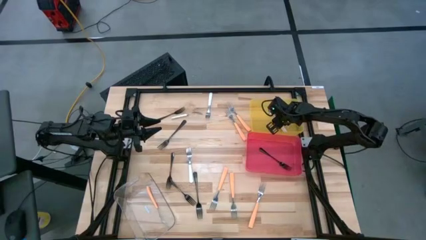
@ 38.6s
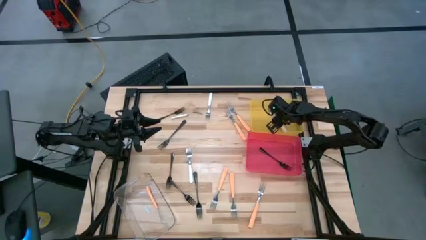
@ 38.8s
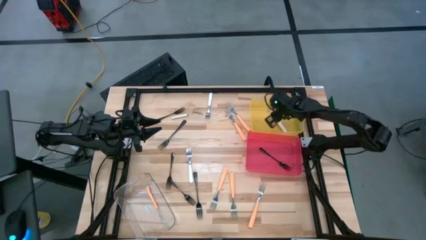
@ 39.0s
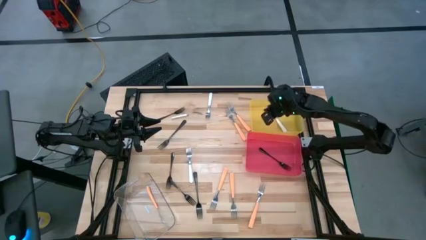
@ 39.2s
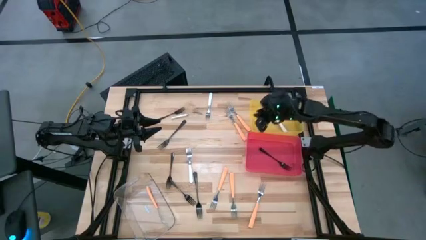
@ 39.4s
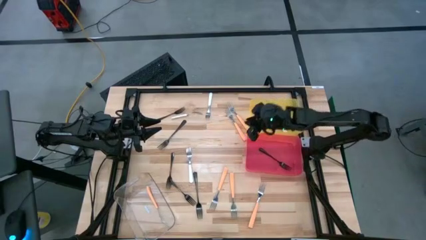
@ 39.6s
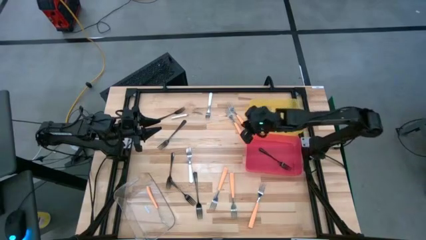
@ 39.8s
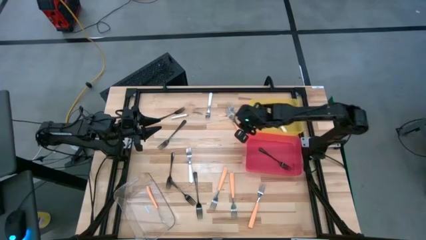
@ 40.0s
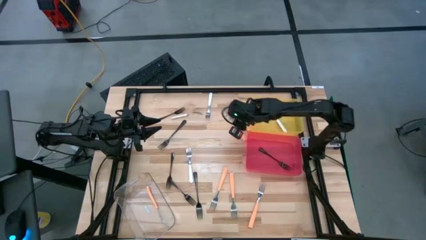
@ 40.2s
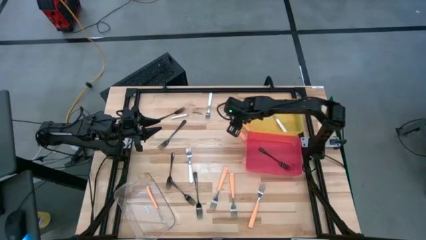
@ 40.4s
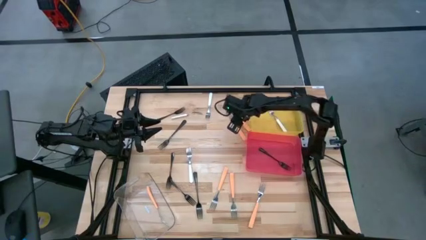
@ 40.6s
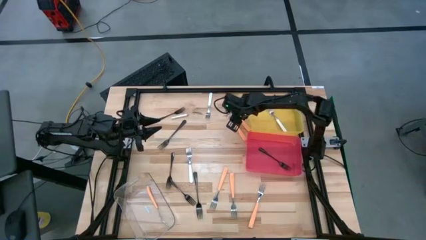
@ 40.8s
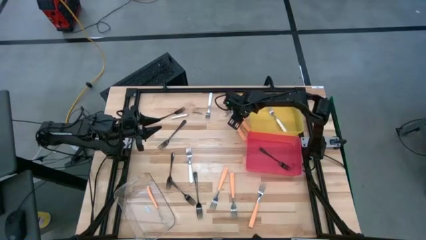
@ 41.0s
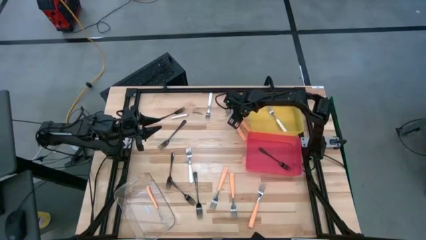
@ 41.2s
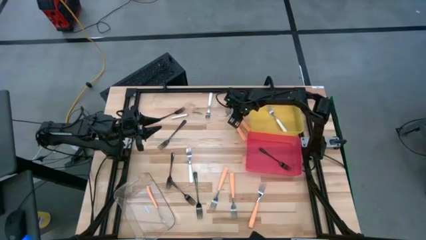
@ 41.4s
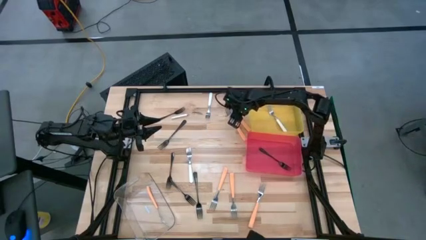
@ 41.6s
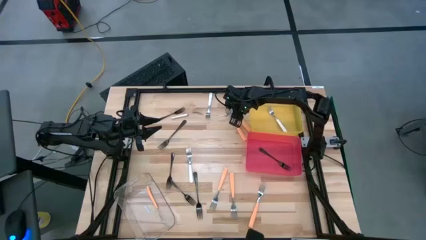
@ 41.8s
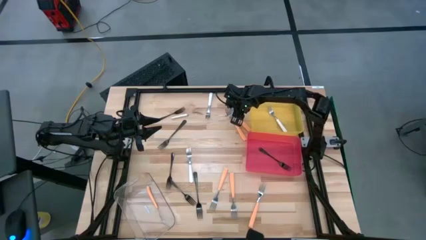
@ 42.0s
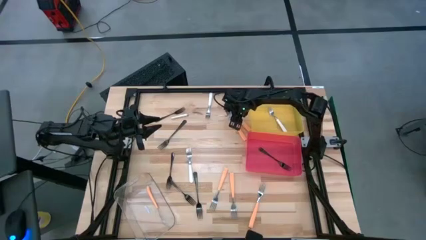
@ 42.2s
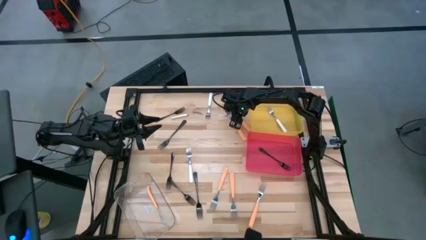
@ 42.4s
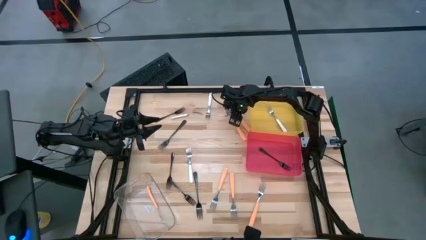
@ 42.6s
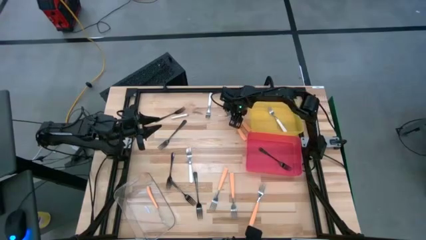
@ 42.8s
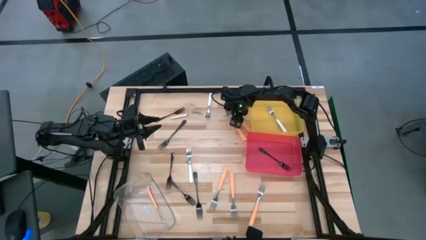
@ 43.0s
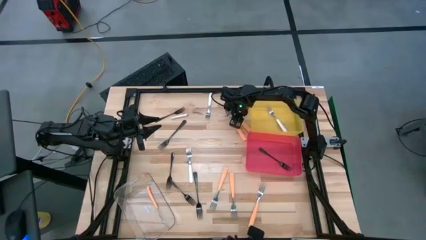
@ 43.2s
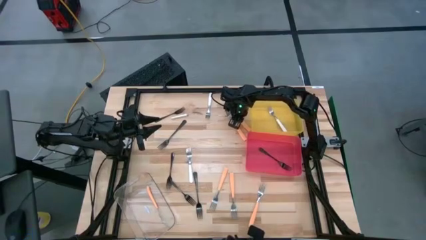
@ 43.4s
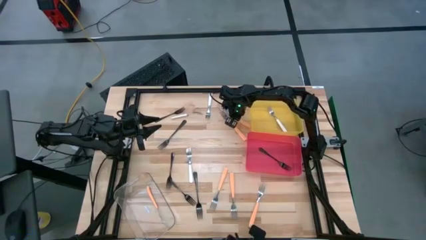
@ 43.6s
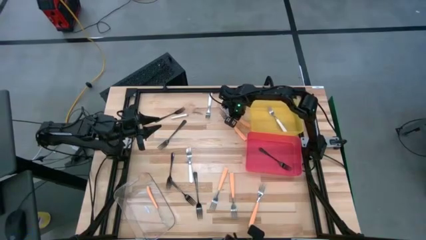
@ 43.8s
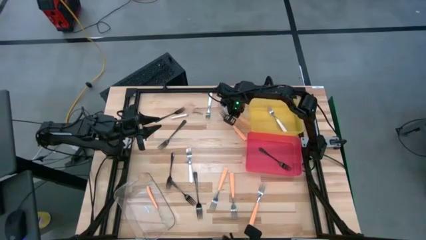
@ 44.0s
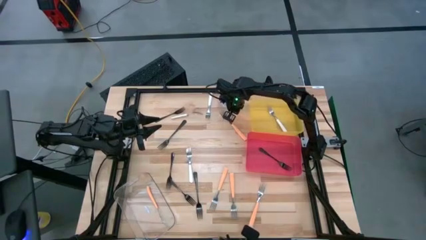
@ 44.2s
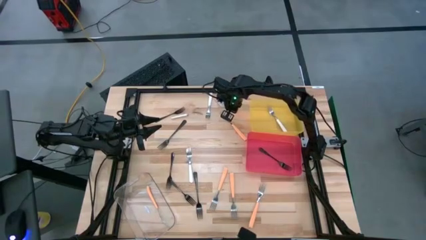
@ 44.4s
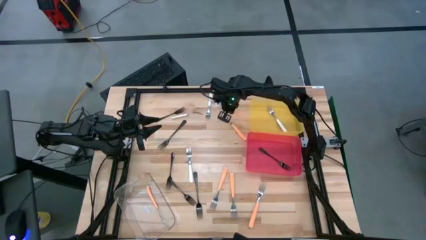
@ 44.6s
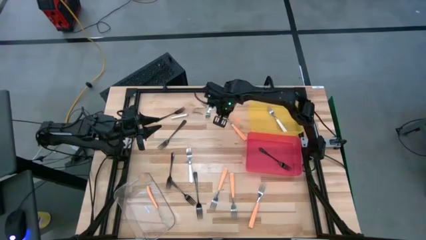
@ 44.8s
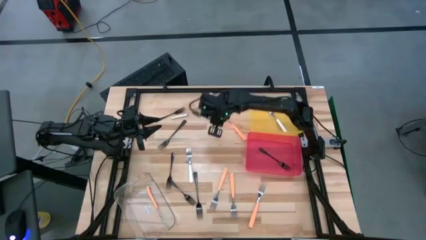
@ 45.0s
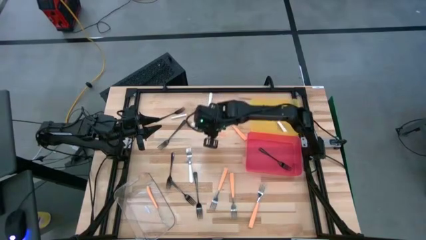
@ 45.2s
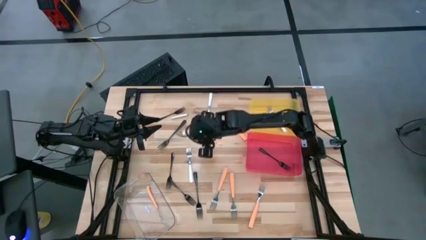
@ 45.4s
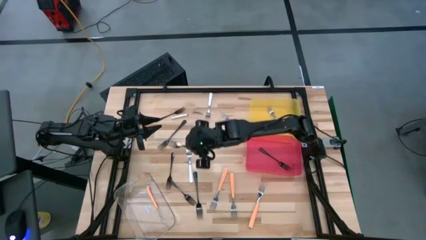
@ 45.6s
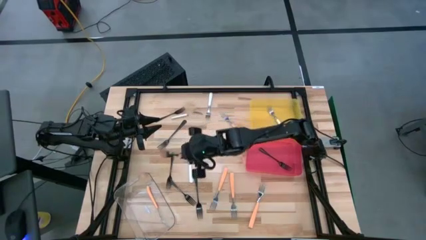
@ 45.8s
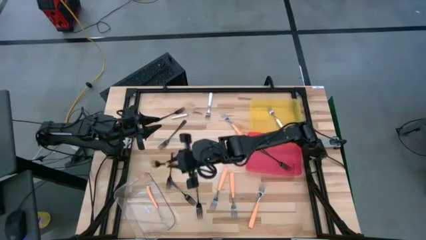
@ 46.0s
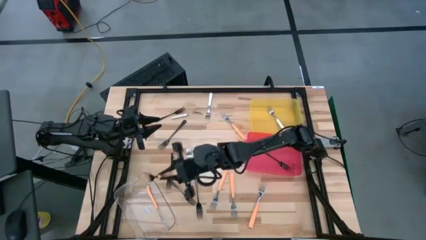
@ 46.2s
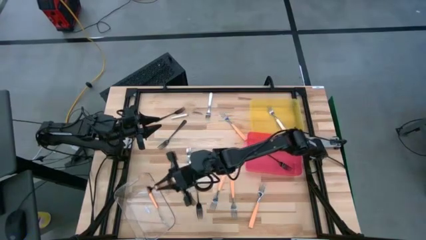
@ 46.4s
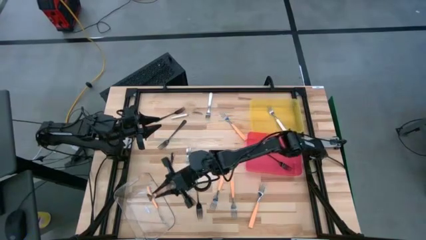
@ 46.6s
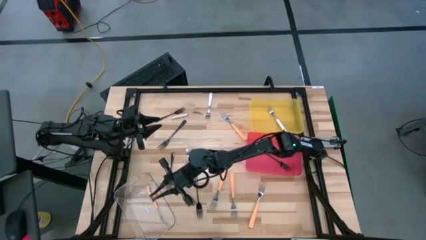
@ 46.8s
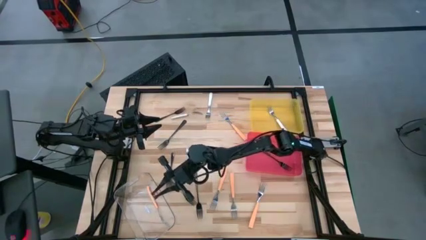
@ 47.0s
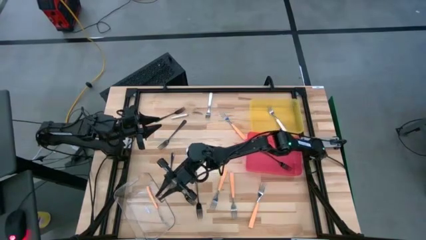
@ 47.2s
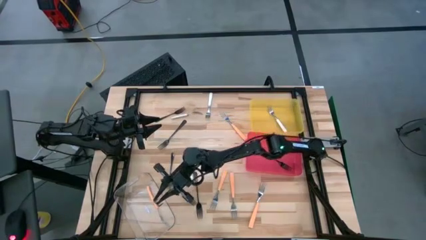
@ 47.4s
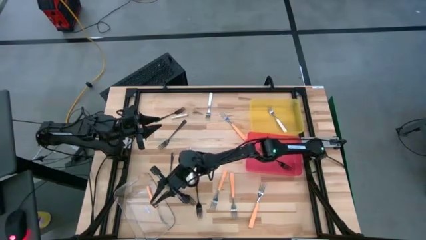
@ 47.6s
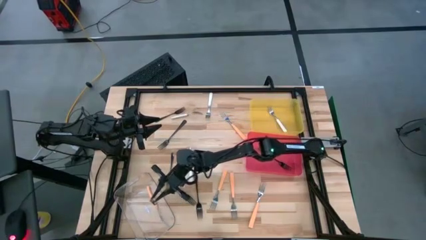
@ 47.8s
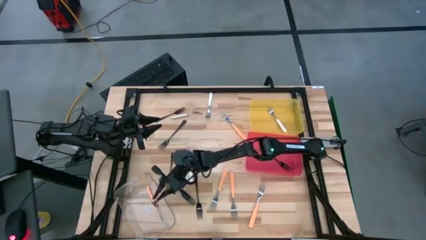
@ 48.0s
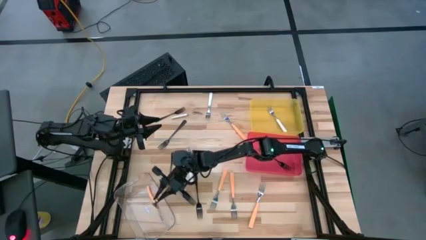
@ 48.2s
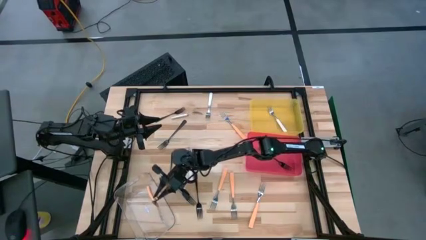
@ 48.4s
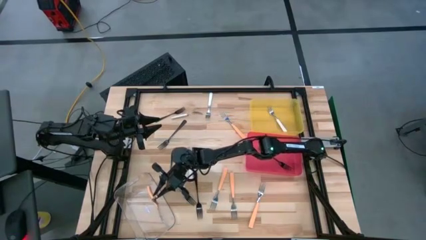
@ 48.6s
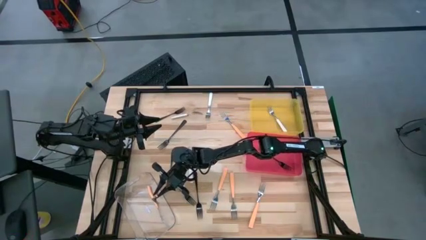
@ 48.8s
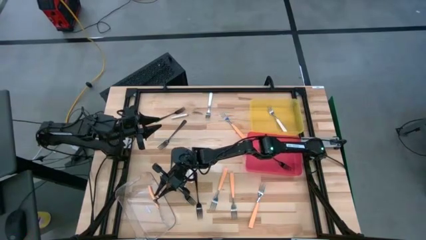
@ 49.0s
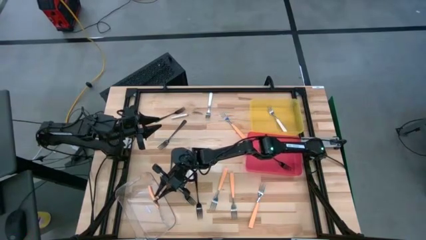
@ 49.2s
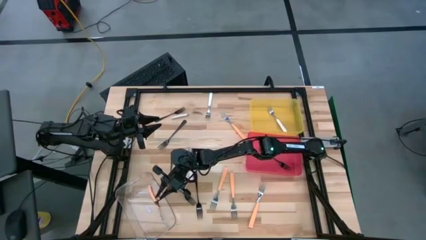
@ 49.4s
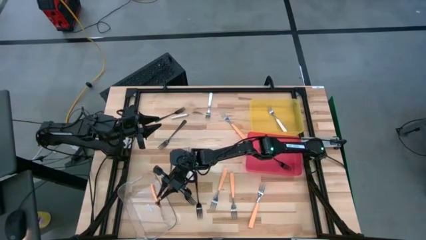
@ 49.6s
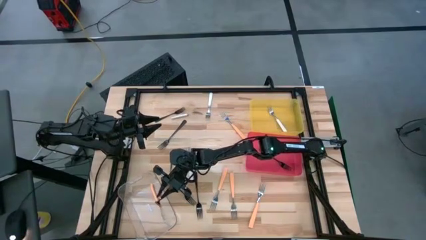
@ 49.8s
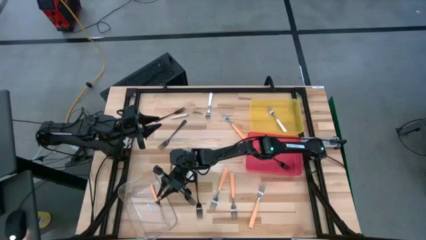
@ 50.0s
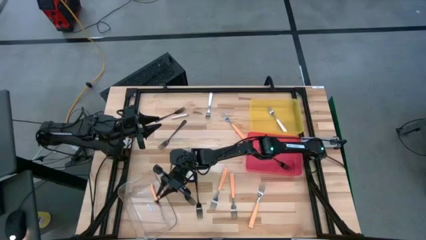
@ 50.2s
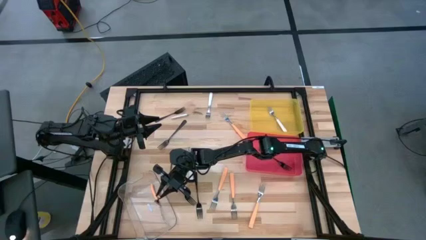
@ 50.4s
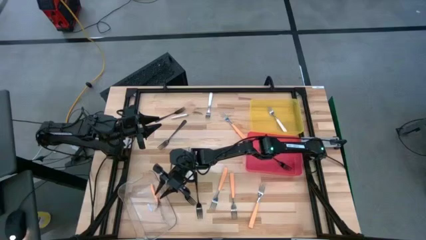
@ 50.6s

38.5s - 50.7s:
Task: Sort silverware by color (type)
Put the orange fork into the transparent bin
